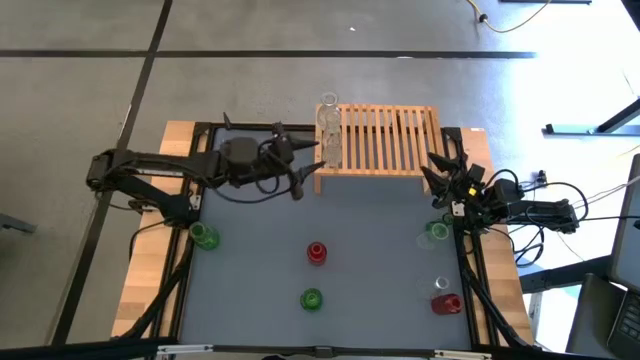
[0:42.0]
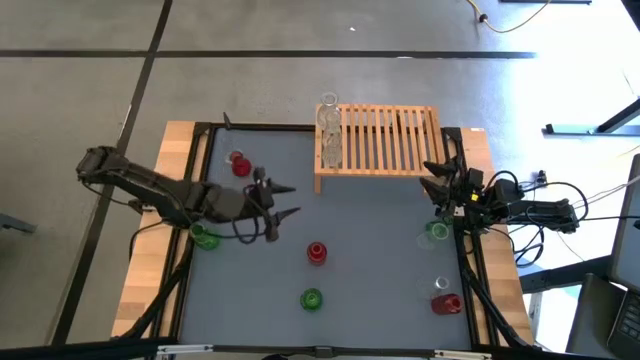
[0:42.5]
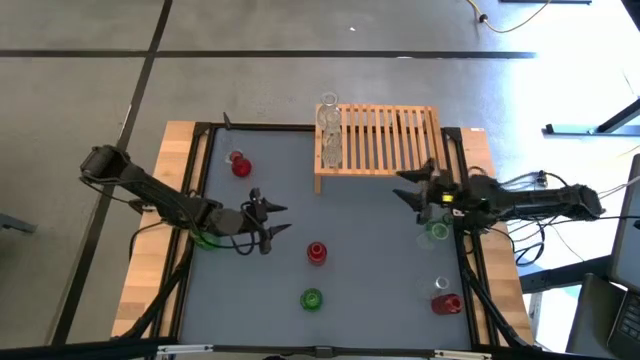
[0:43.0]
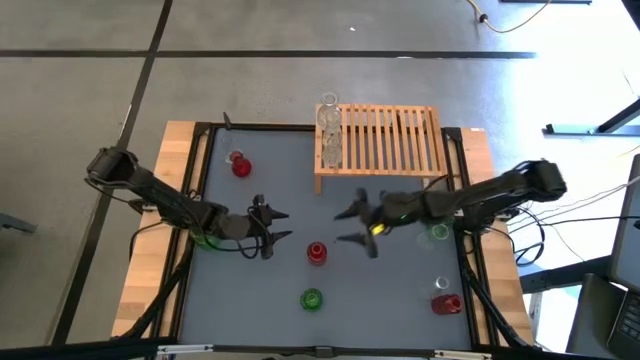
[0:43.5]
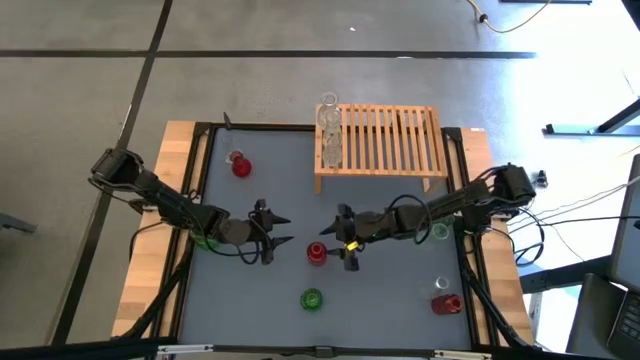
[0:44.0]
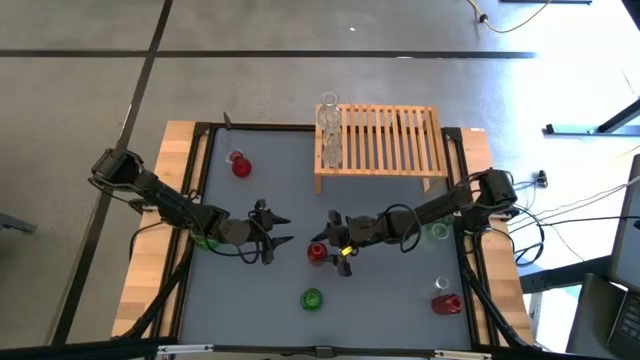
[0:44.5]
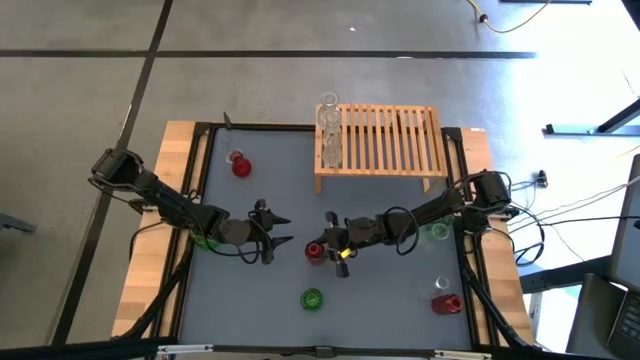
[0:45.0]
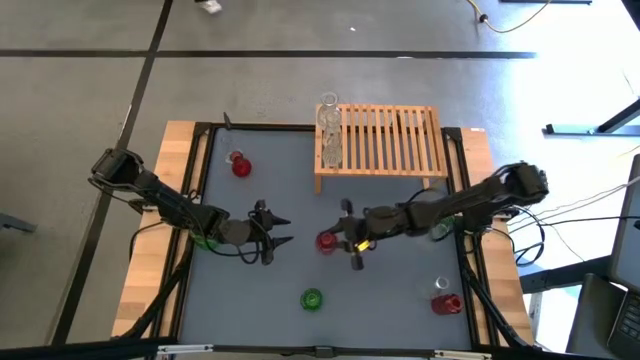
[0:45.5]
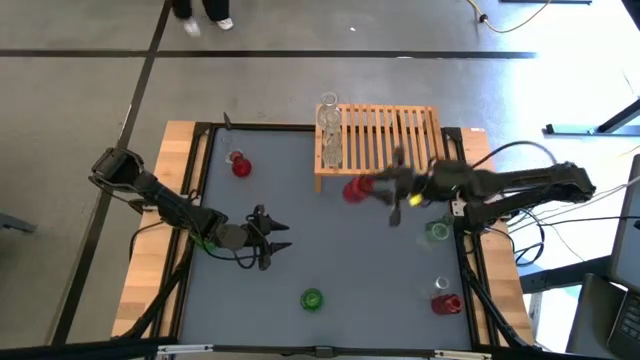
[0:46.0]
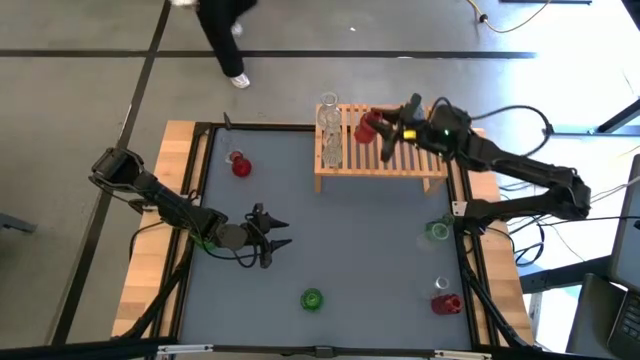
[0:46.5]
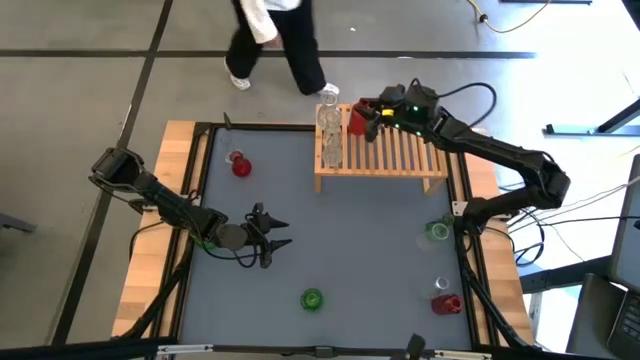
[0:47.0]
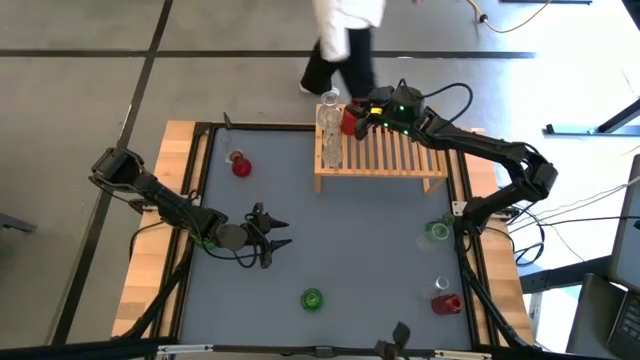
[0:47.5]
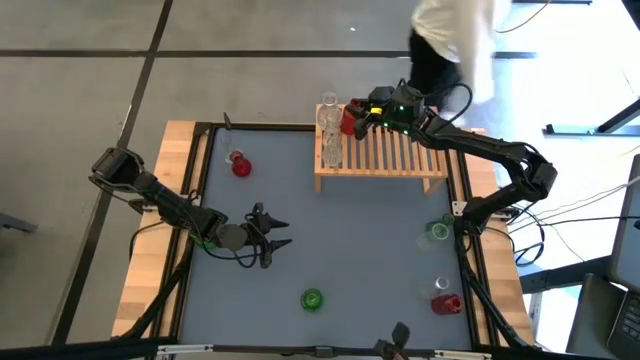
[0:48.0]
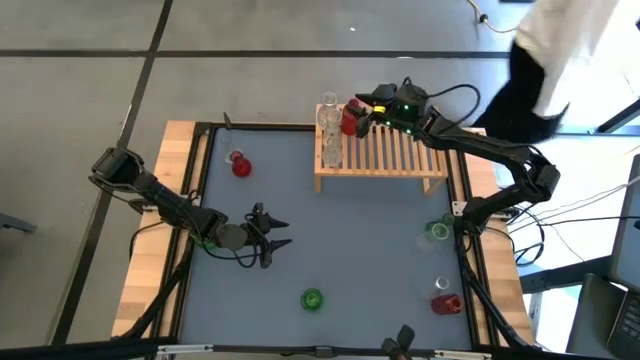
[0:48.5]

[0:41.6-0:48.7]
Task: sort vases onto shelf
Put the center red vase onto the shelf

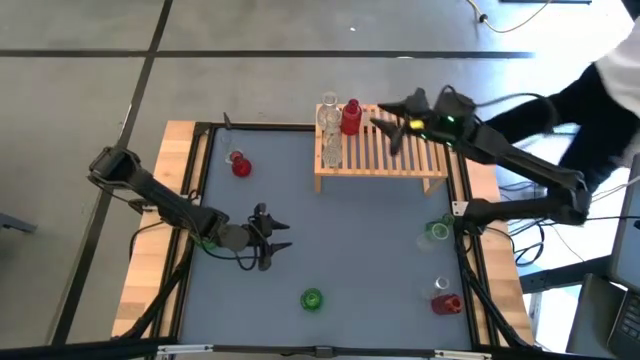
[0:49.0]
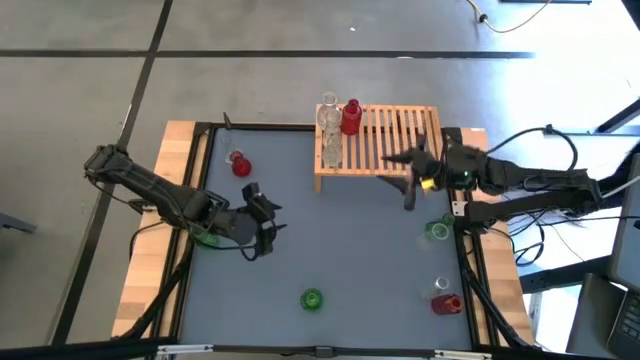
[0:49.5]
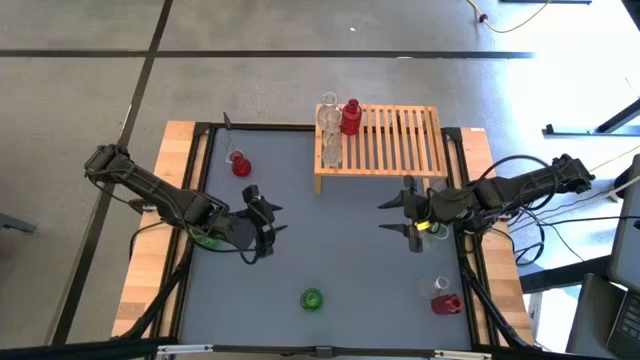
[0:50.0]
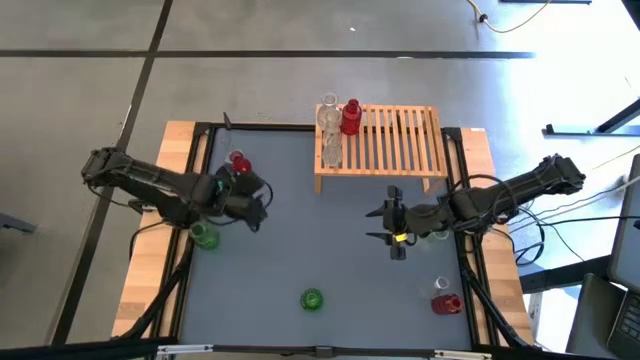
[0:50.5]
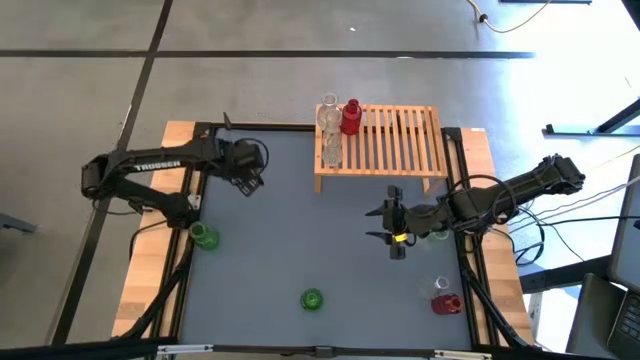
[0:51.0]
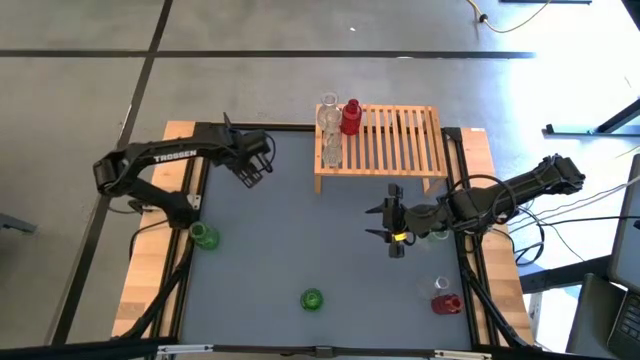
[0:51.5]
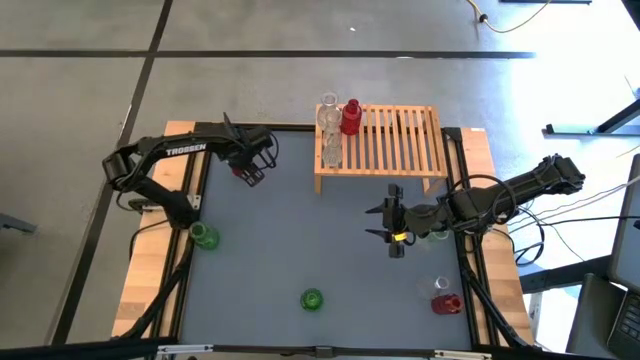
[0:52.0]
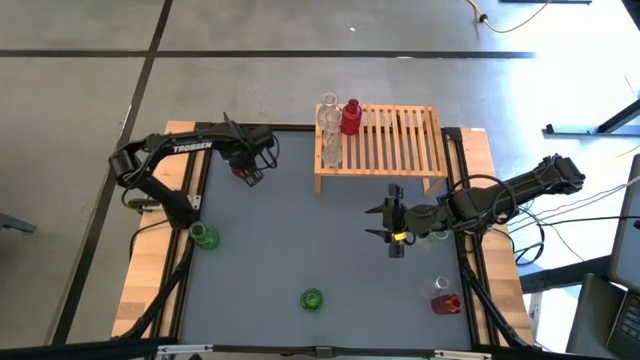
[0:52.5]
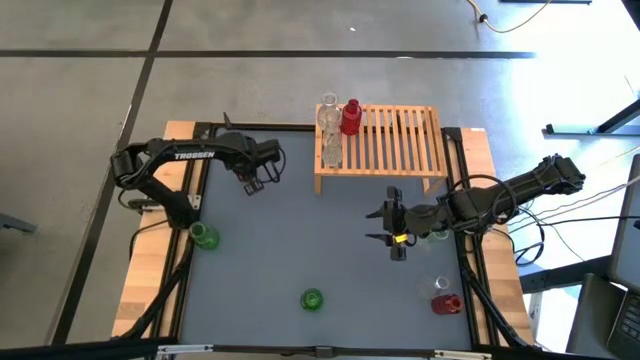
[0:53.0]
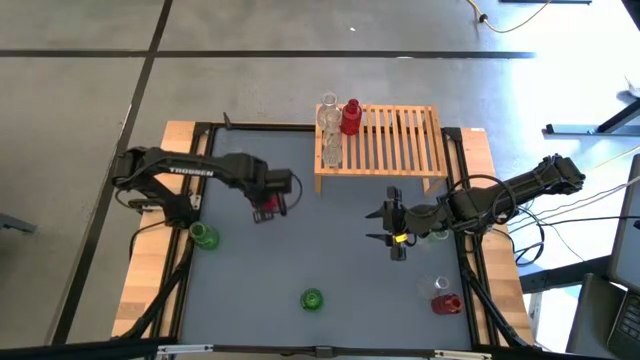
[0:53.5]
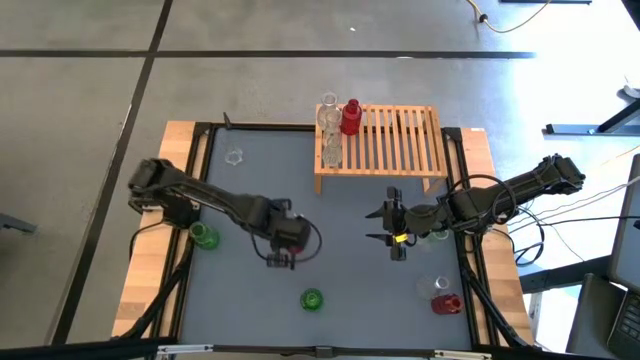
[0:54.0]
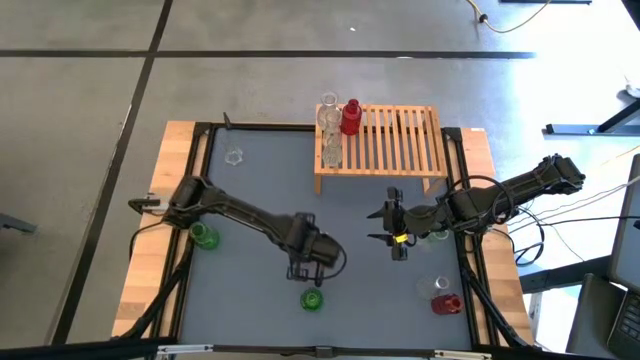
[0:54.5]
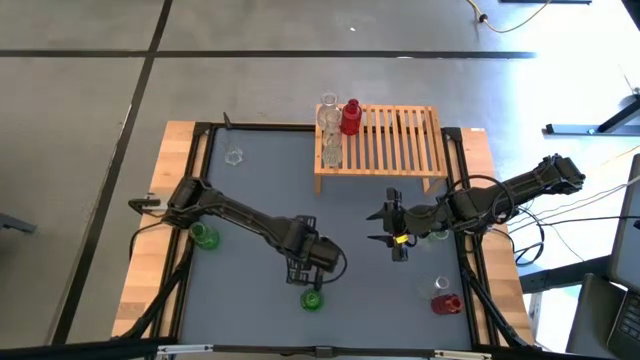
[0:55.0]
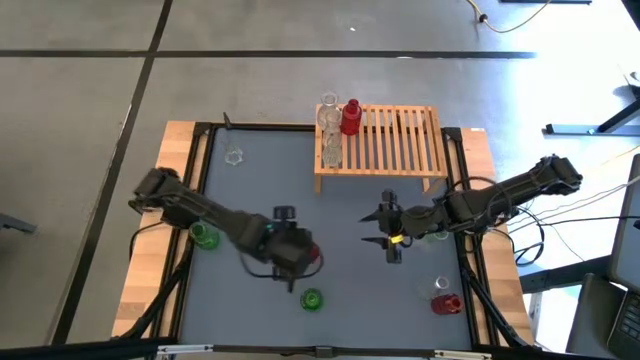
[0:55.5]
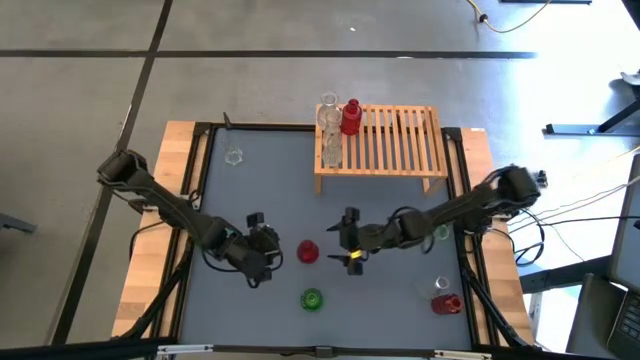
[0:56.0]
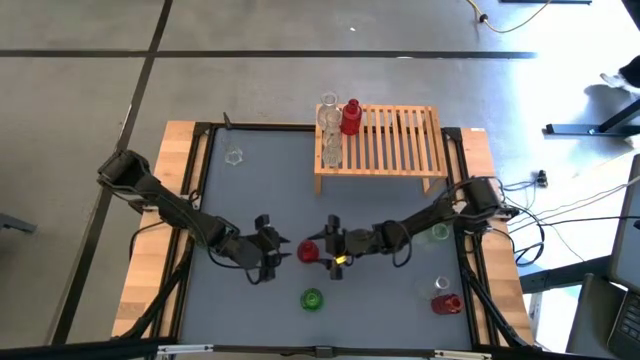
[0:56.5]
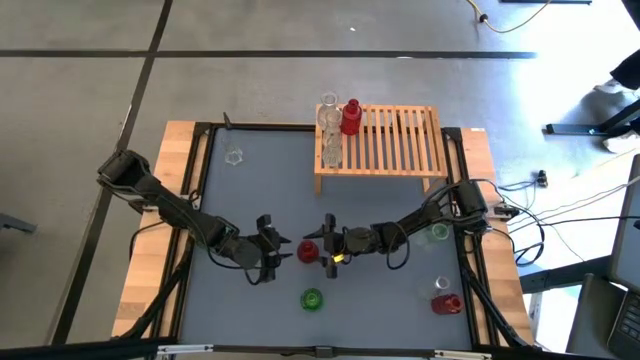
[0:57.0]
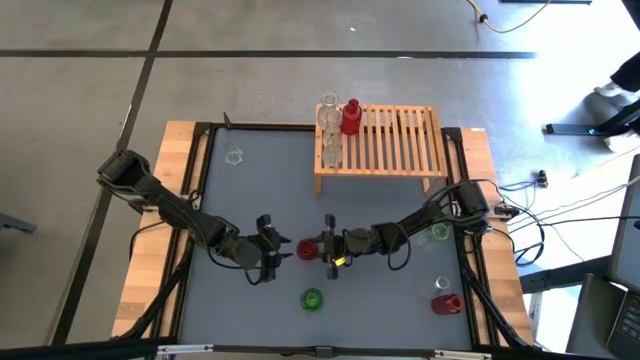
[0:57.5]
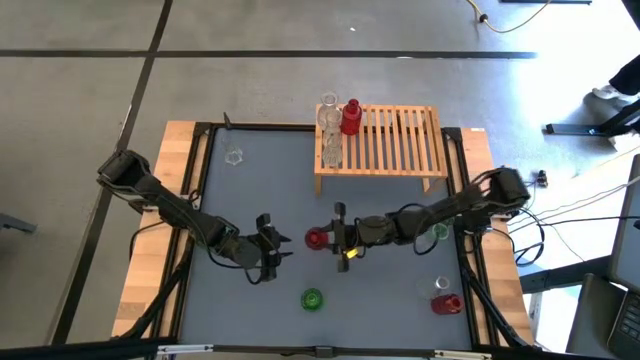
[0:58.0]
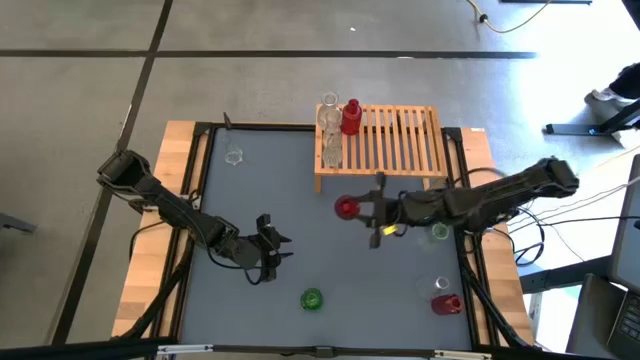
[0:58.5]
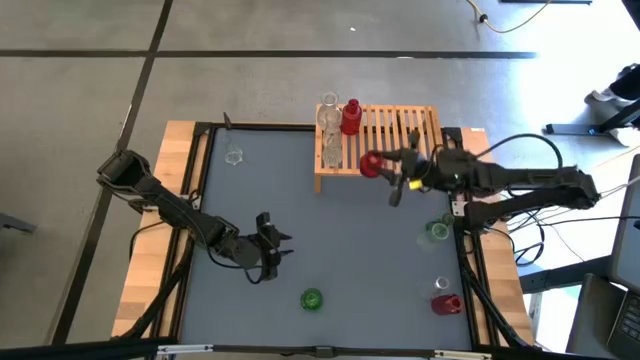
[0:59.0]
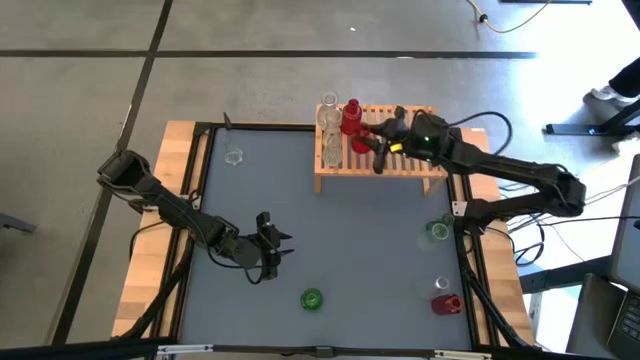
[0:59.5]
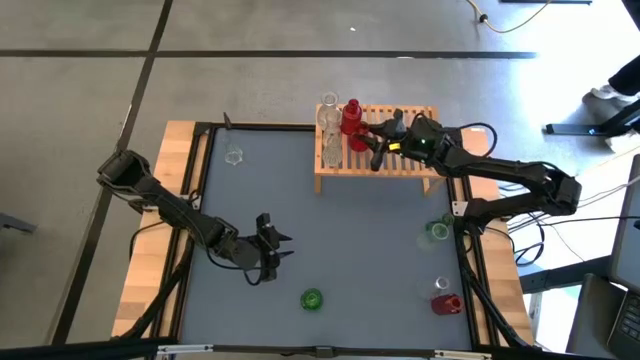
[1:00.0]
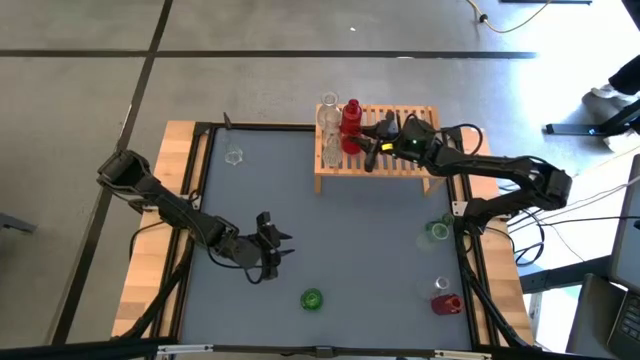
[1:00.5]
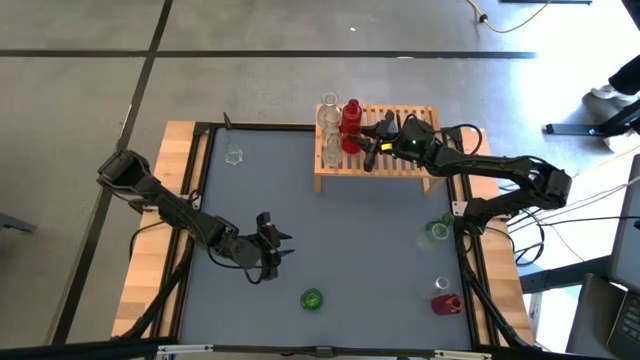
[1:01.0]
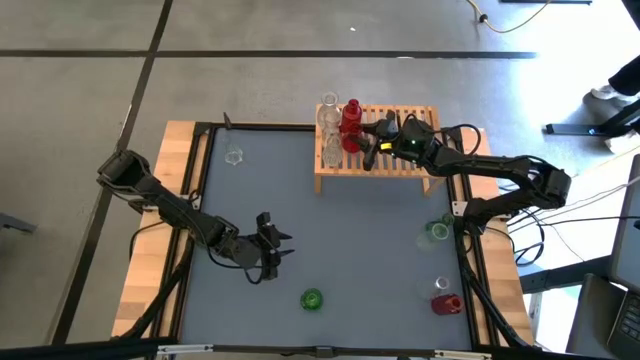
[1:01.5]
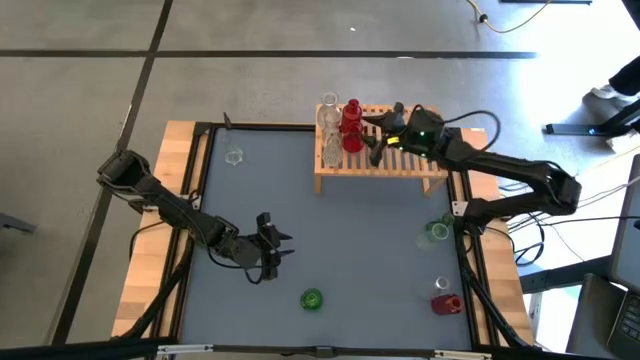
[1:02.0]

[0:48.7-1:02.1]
Put the top red vase onto the shelf aligned with the other red transparent vase
